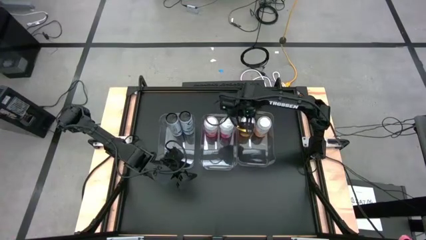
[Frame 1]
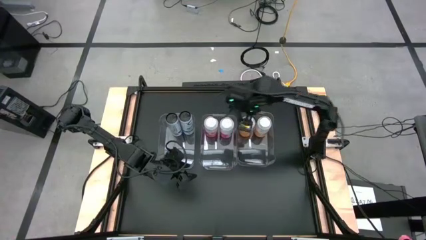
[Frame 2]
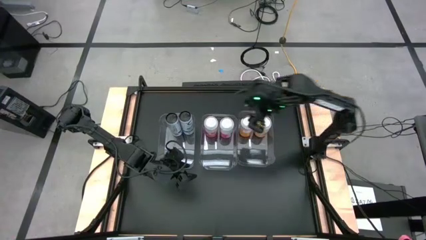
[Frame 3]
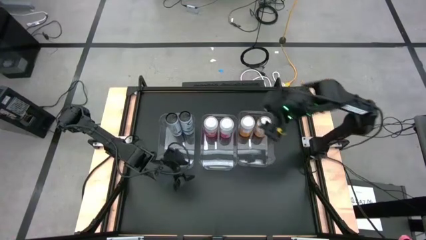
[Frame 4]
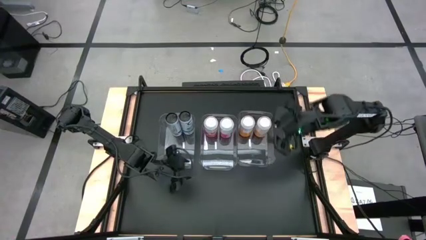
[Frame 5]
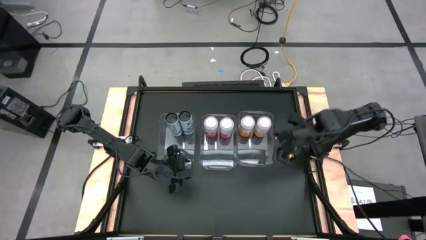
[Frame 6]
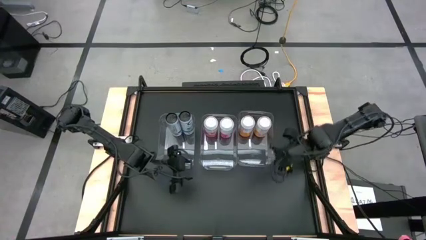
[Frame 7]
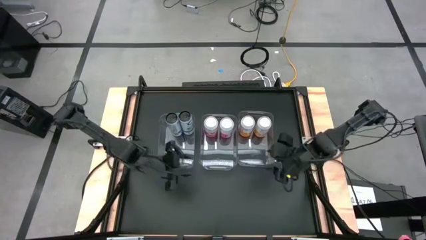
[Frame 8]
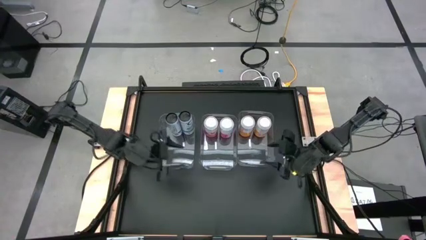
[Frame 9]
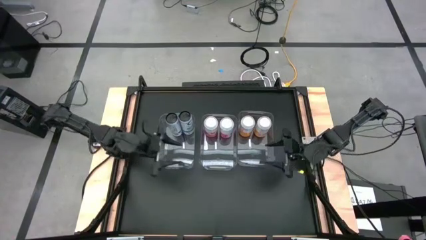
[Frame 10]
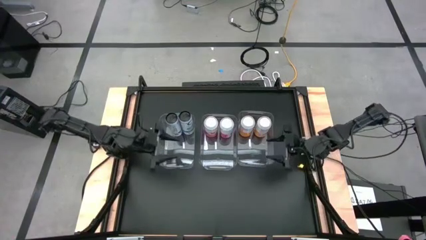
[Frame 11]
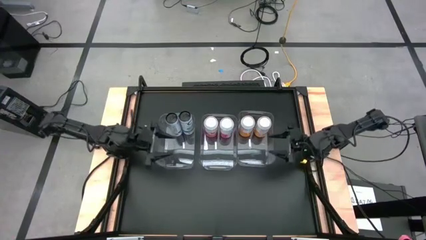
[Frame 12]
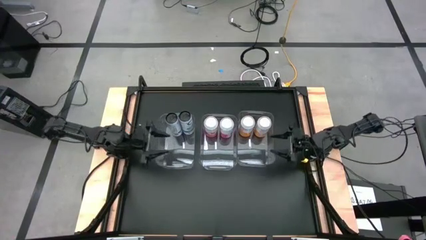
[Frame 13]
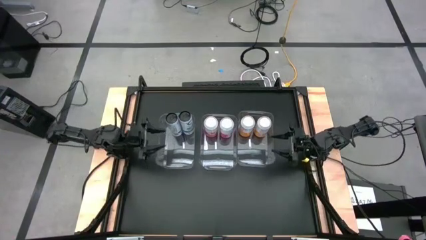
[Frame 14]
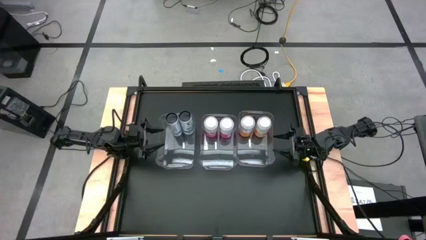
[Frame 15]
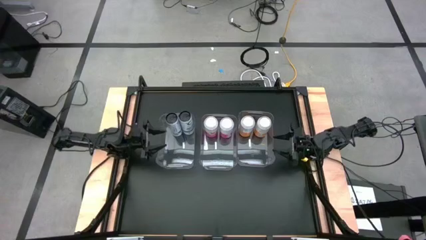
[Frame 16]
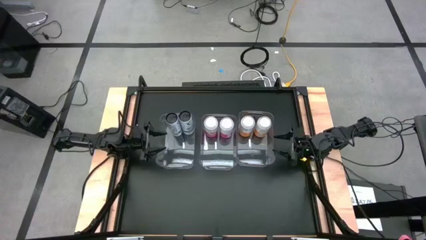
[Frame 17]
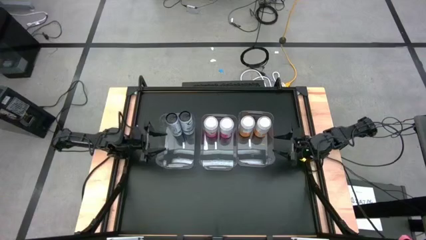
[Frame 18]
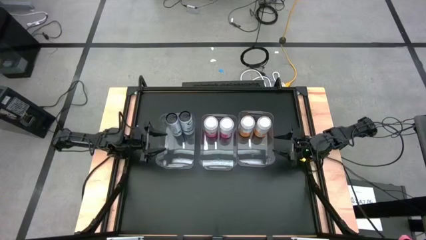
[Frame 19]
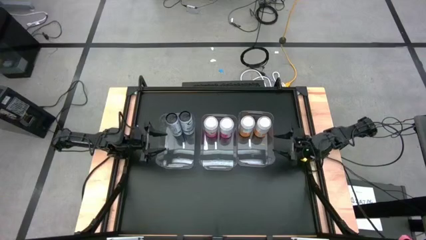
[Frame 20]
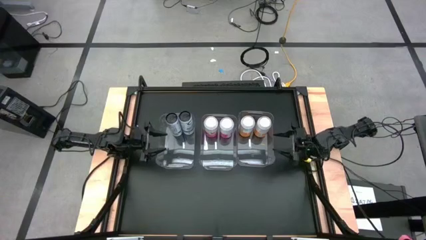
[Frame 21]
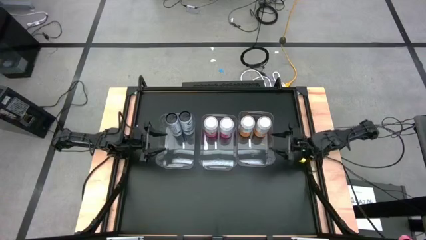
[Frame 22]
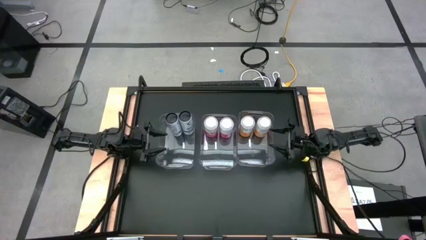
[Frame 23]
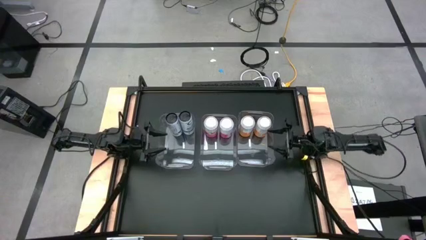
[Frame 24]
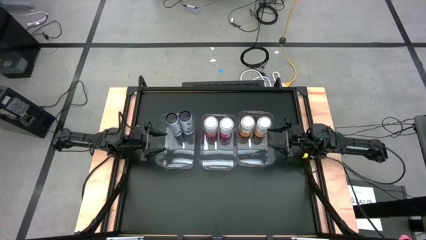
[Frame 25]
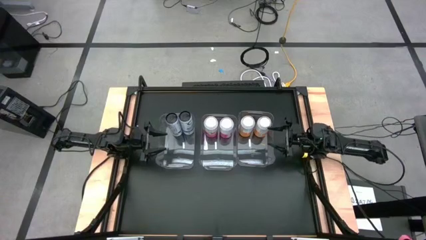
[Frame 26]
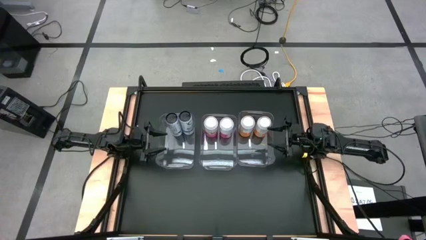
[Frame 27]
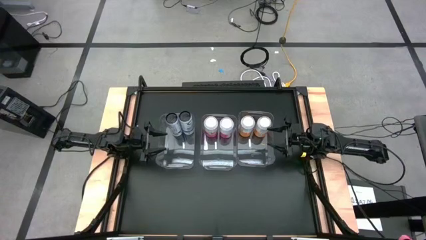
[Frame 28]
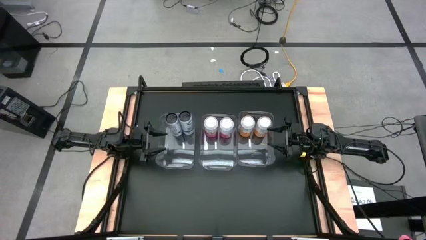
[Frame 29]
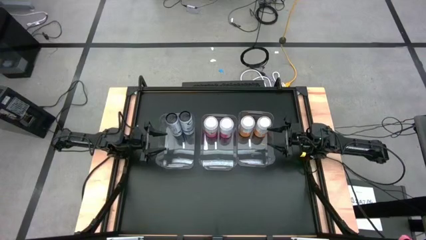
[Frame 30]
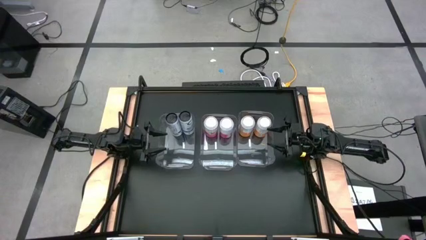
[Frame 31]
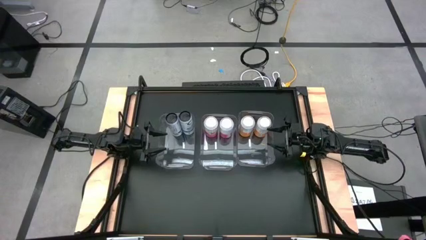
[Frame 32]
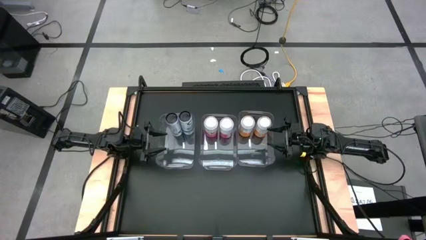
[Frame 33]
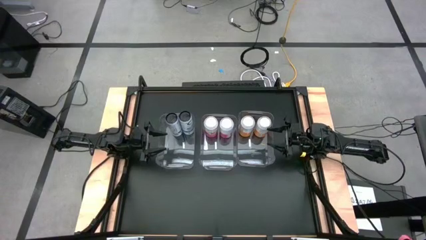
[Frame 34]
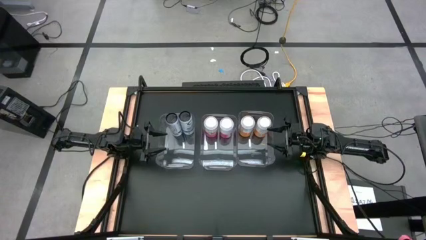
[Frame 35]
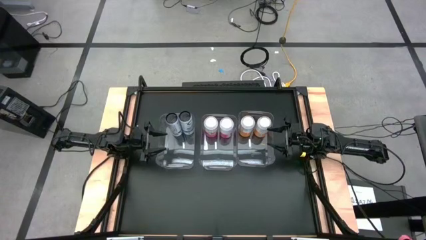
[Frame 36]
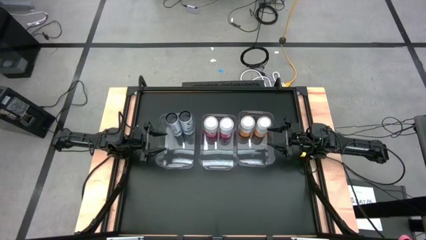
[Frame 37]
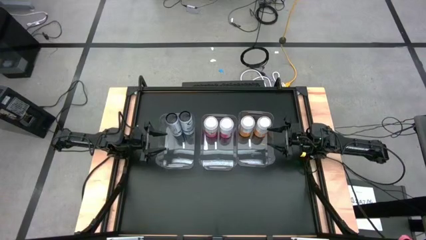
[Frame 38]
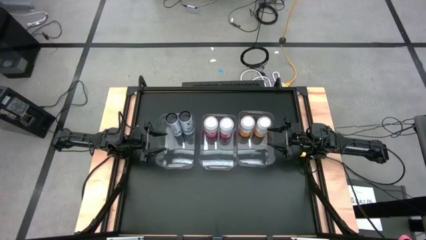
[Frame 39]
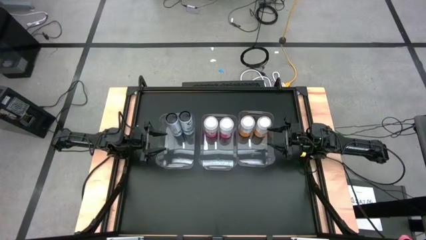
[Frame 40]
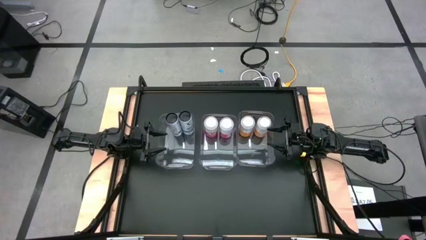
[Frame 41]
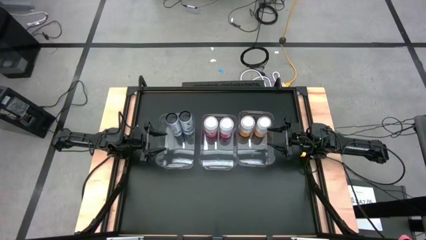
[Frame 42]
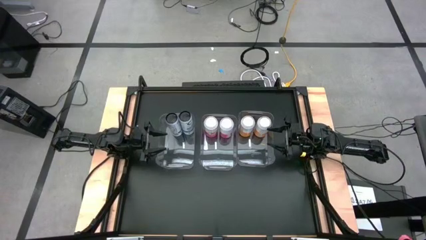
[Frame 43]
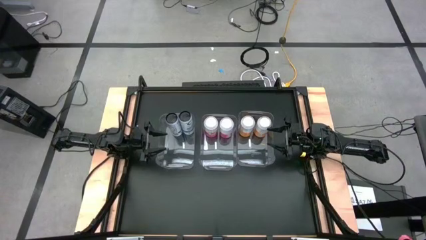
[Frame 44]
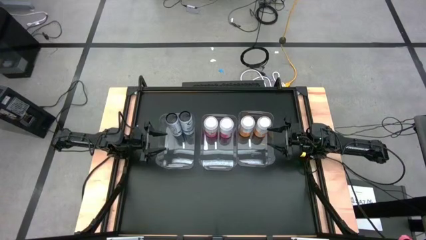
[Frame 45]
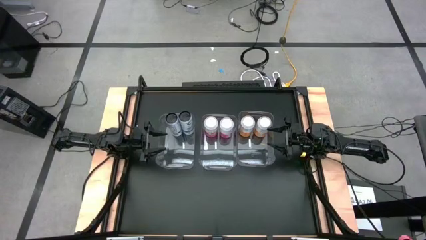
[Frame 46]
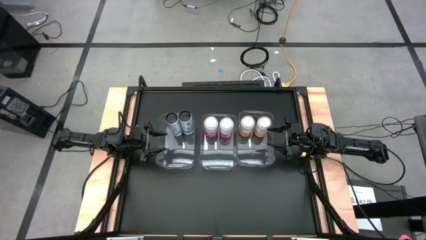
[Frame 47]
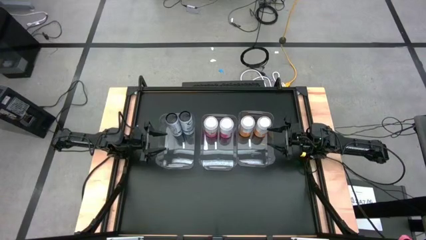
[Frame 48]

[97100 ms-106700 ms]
Task: Sort soda cans
Return to Home Position

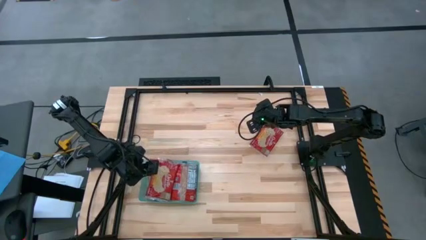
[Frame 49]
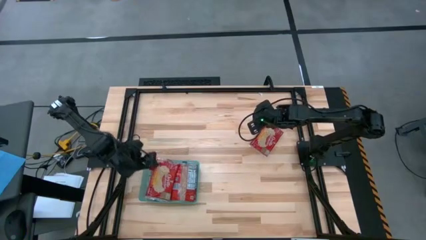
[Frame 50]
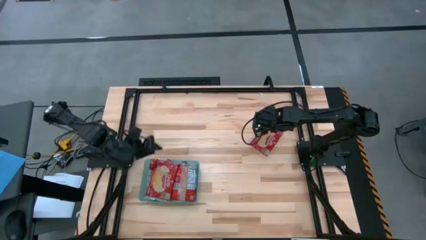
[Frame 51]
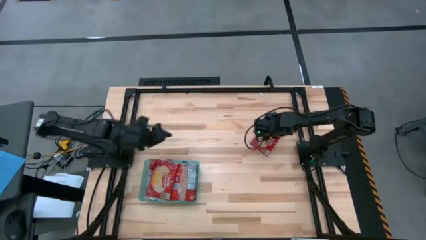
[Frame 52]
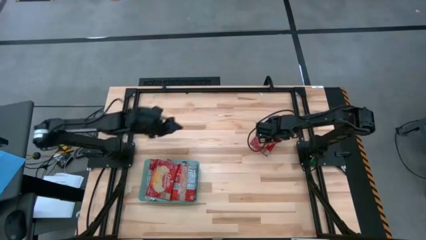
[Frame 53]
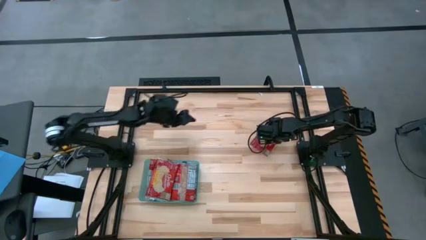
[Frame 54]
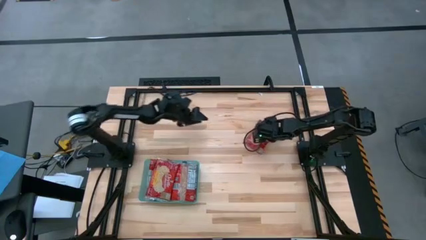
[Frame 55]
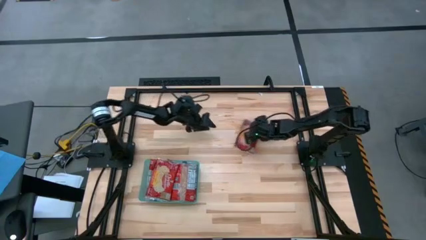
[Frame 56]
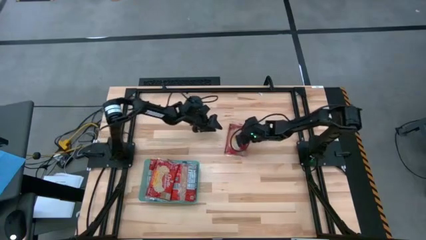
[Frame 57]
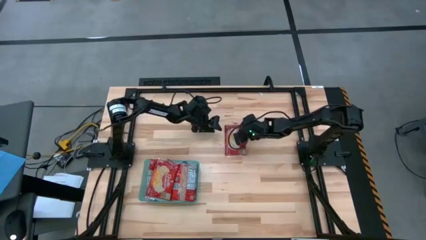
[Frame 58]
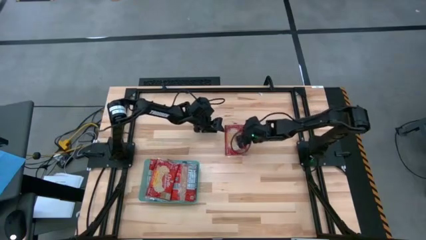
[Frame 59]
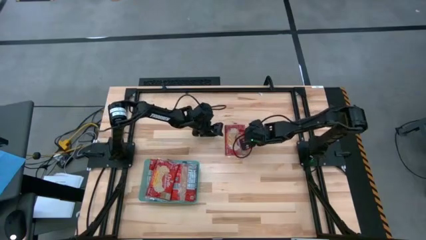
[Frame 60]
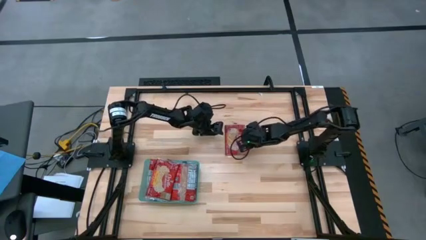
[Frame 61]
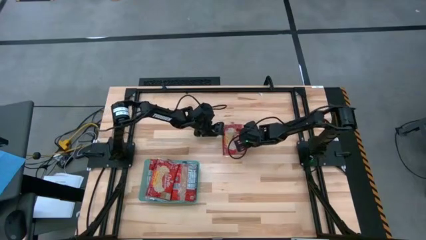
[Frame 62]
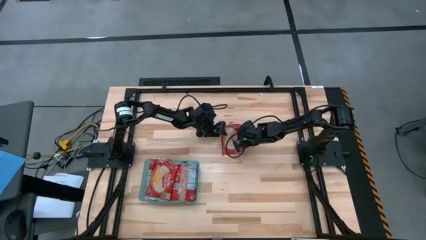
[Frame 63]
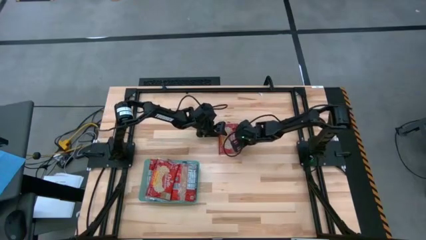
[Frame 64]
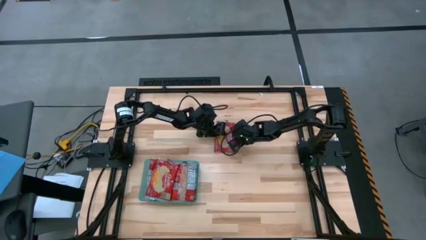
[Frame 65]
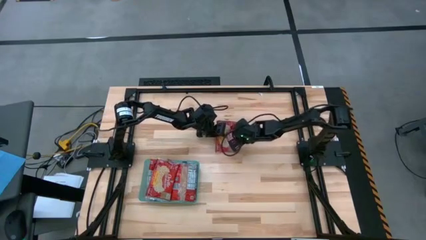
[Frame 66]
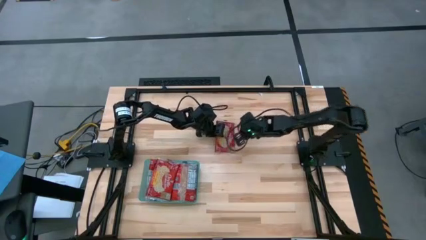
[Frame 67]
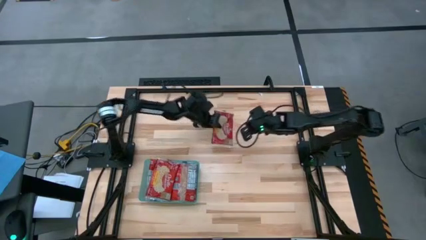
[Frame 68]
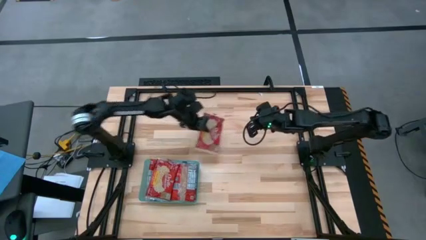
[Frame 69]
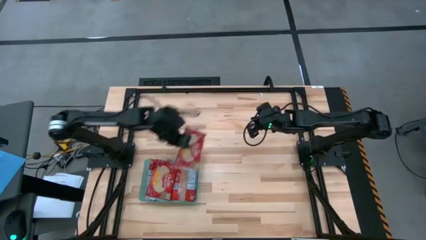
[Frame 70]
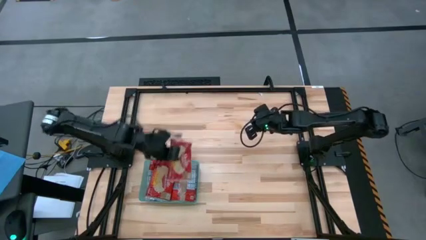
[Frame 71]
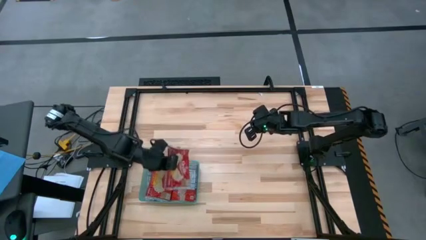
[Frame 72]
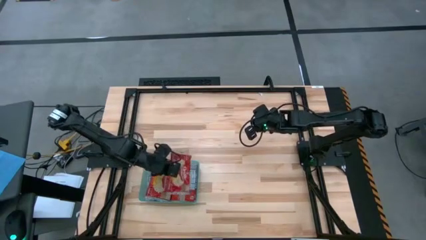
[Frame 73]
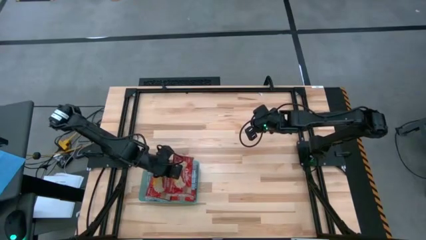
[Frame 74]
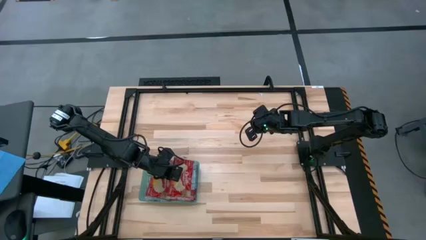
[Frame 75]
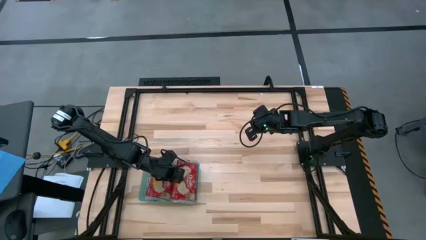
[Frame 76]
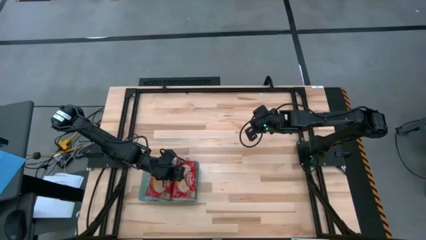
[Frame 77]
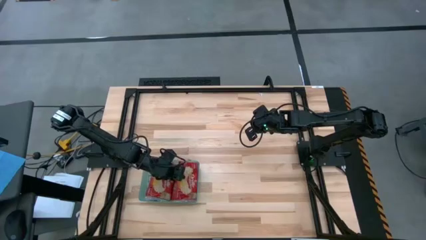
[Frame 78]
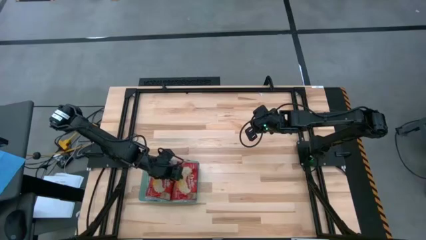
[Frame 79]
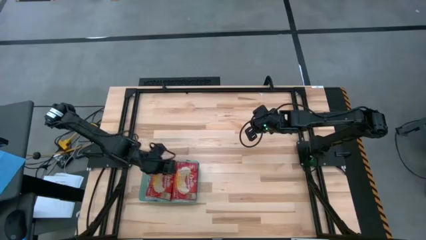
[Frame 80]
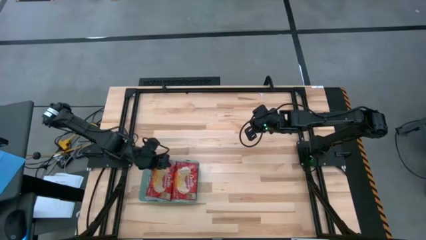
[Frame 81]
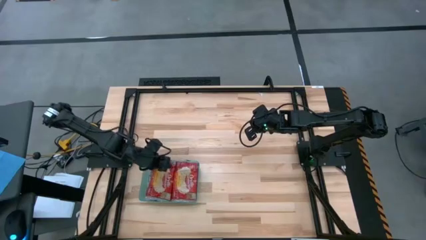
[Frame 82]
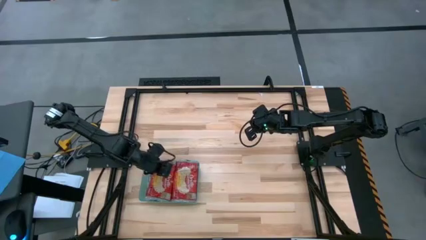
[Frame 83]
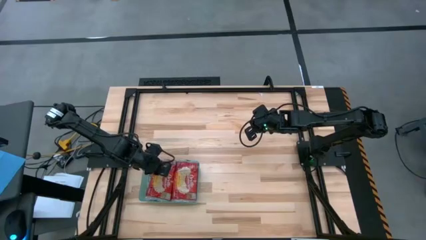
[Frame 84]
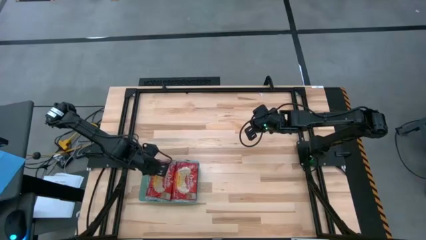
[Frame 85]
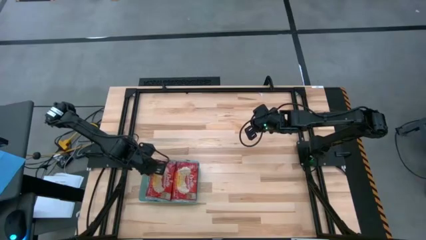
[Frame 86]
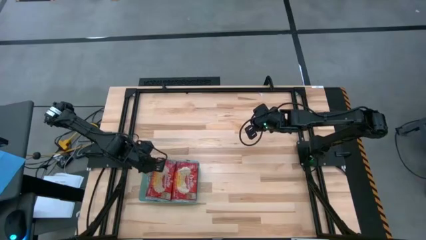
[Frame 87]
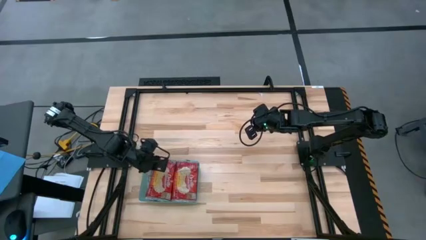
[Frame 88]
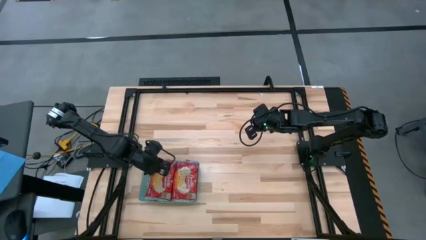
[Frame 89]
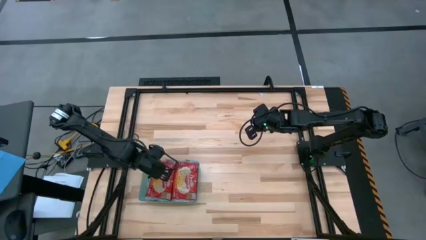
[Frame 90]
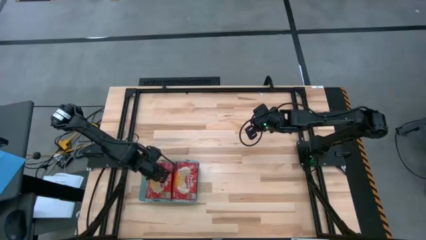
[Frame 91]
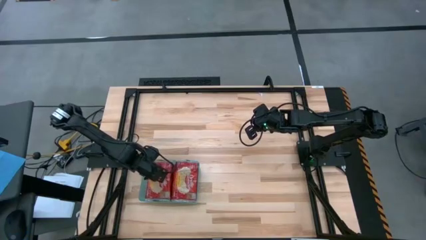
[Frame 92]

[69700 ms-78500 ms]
Task: Sort popcorn bags into baskets
Put the red popcorn pack into the green bin
